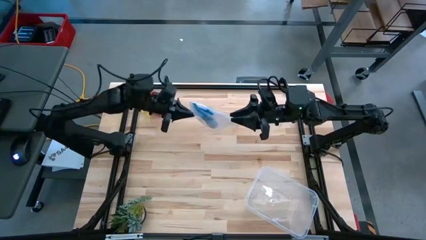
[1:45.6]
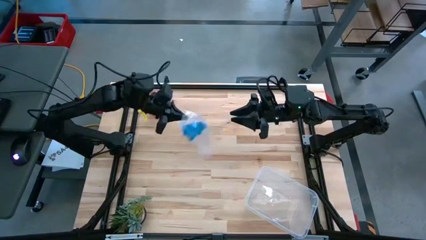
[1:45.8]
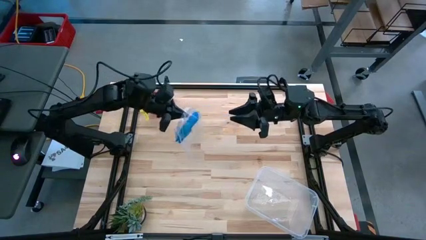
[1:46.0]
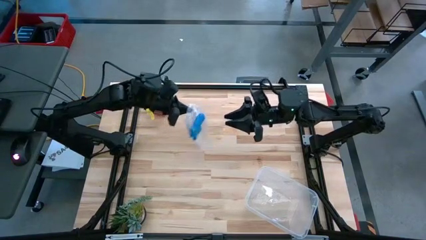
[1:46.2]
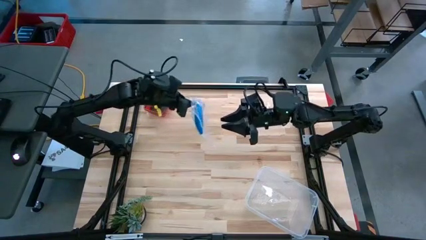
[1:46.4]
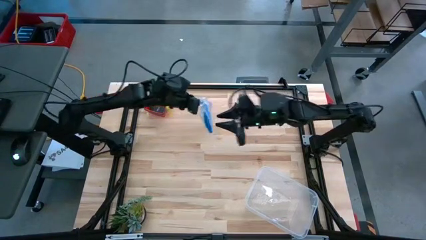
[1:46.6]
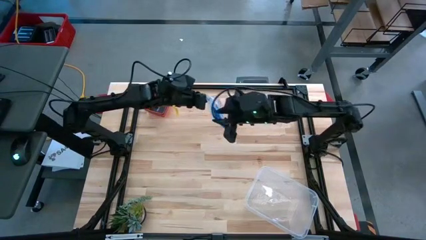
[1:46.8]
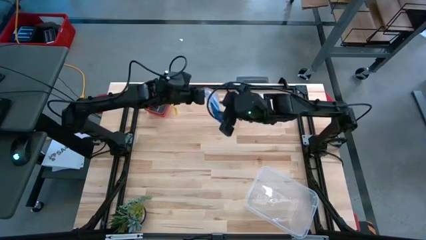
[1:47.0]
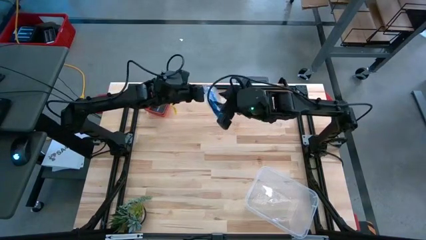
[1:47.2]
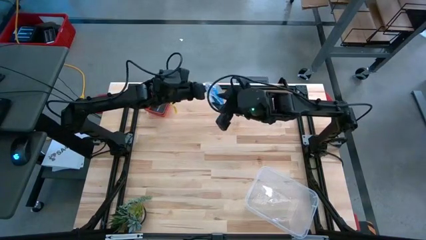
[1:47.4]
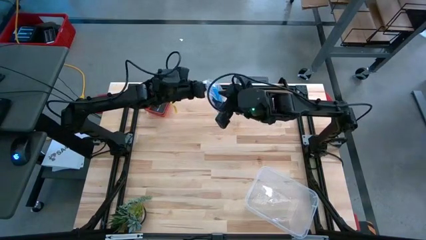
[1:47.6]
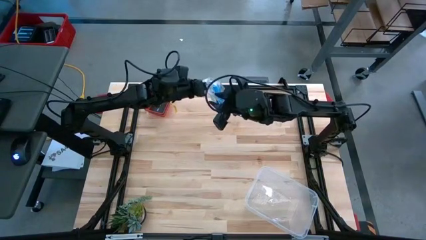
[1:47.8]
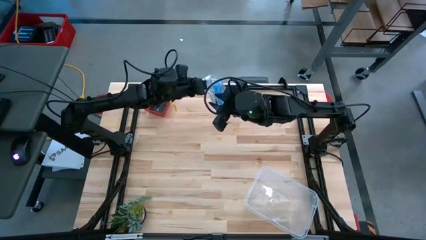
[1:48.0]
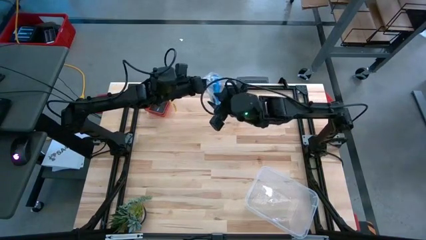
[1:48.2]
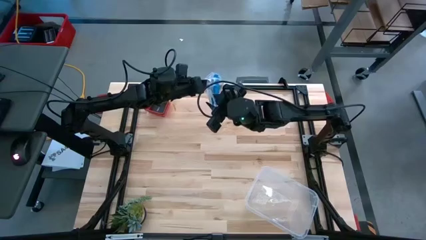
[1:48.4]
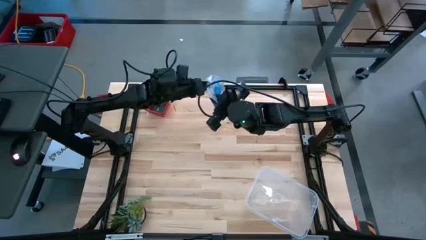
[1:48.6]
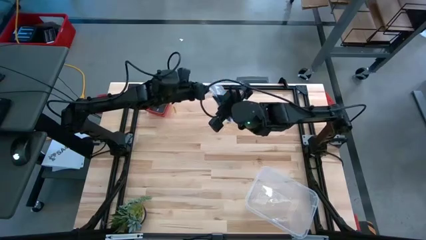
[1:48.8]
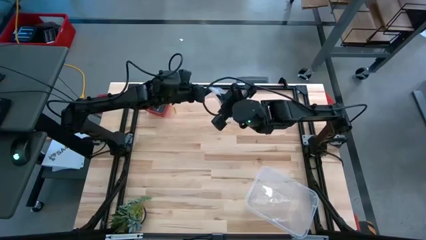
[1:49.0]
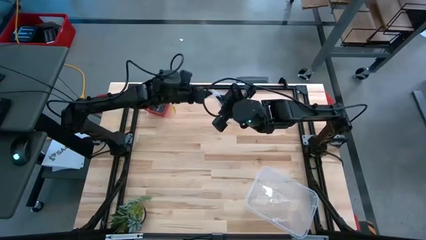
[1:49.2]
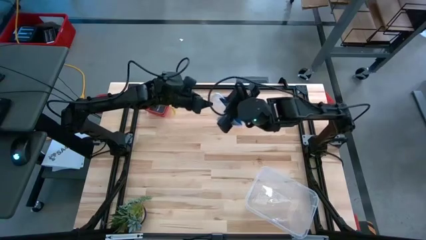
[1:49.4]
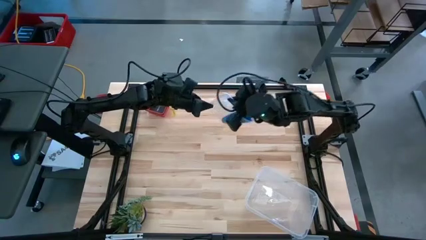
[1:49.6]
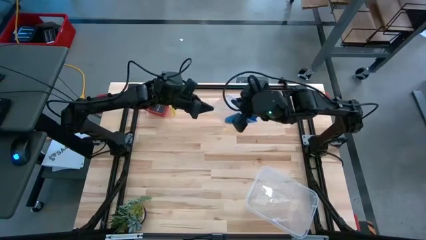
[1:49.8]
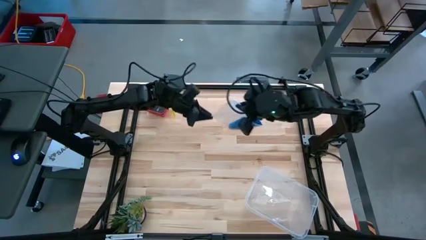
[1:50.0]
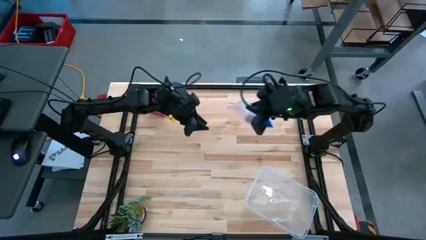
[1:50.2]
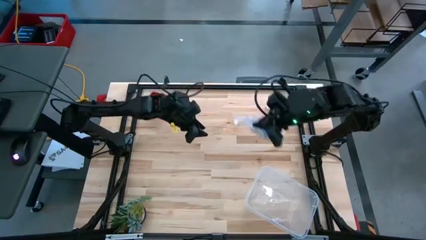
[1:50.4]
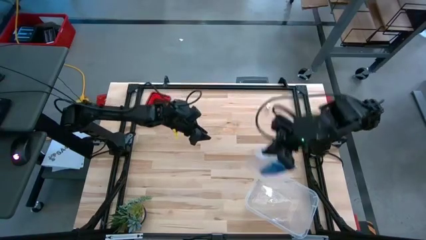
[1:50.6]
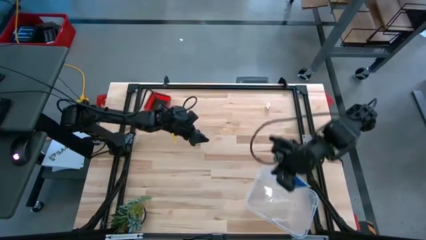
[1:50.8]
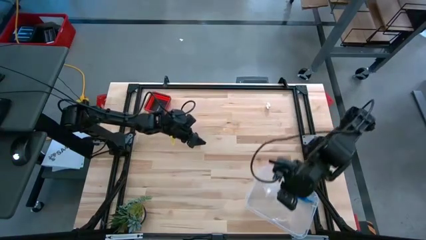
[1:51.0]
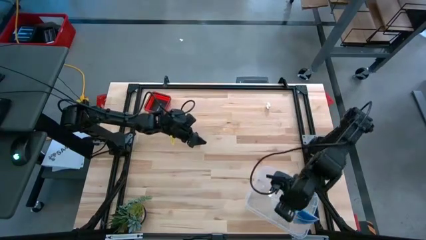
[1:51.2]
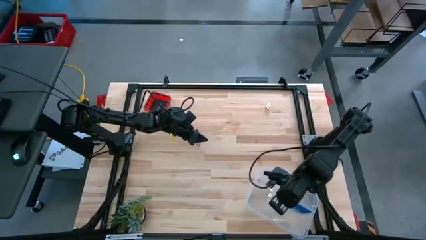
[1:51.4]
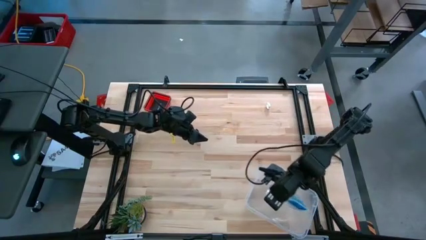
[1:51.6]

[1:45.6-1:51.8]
Task: Roll bandage
Put the transparent zip bag into the transparent bin

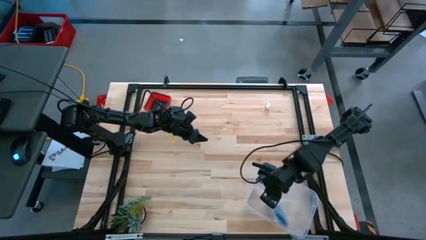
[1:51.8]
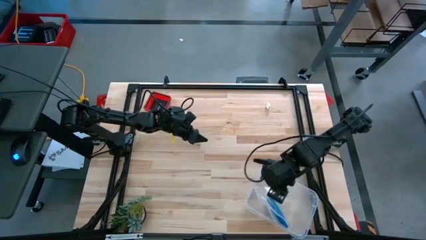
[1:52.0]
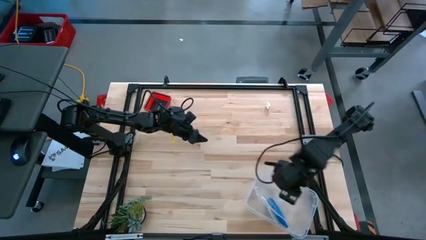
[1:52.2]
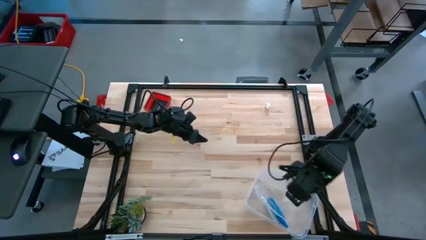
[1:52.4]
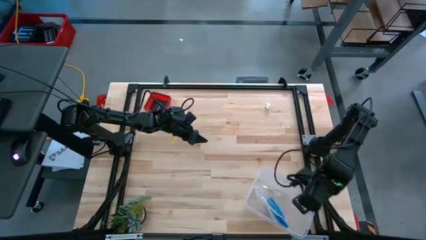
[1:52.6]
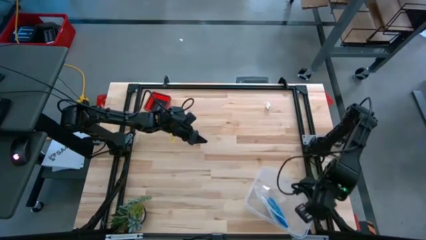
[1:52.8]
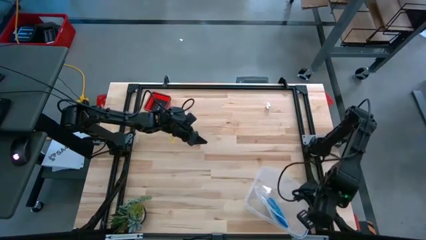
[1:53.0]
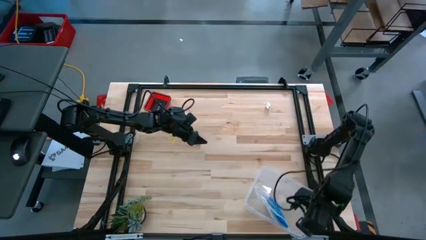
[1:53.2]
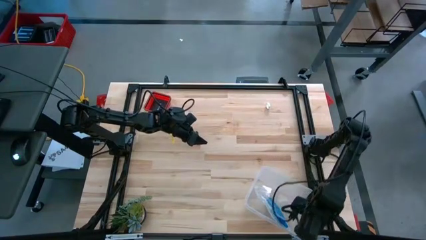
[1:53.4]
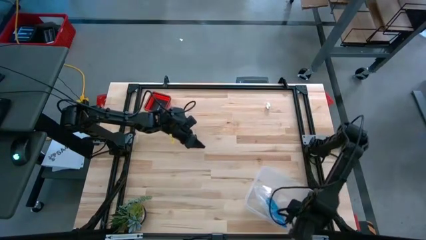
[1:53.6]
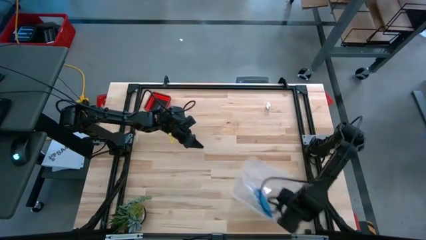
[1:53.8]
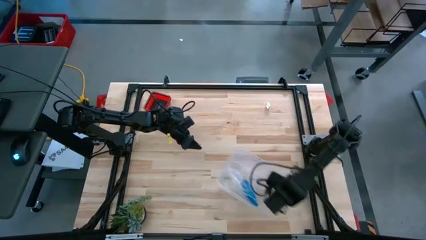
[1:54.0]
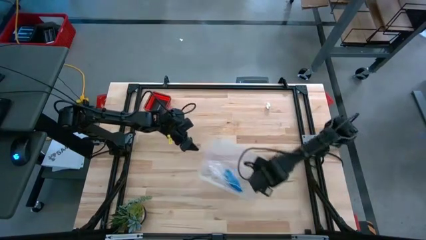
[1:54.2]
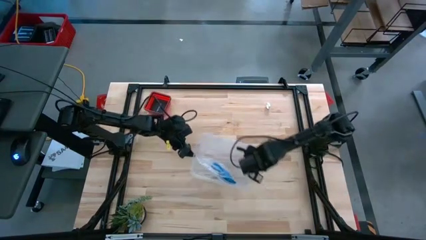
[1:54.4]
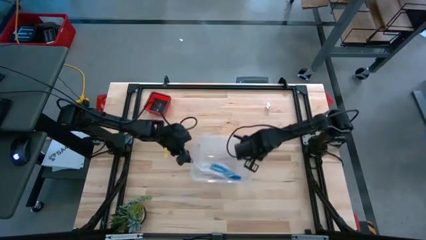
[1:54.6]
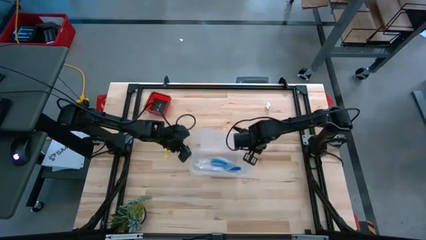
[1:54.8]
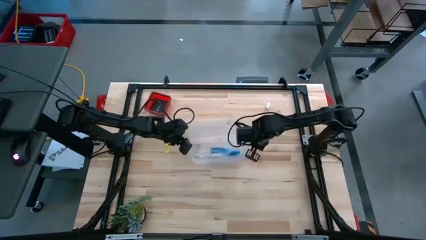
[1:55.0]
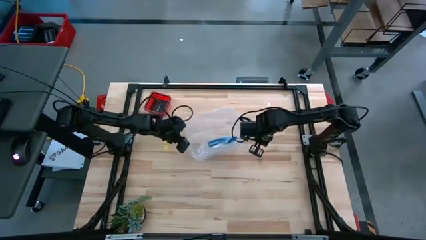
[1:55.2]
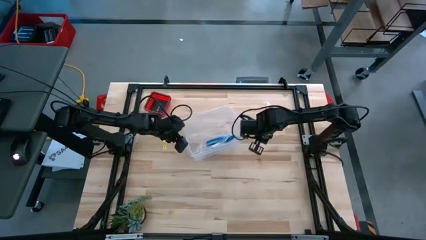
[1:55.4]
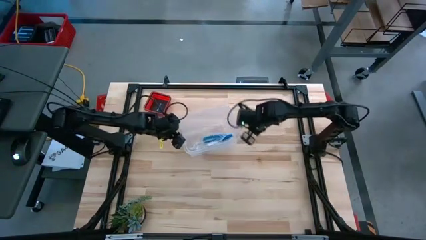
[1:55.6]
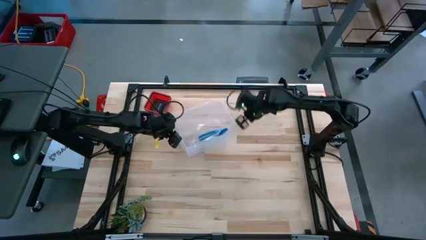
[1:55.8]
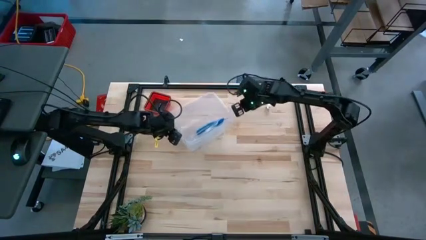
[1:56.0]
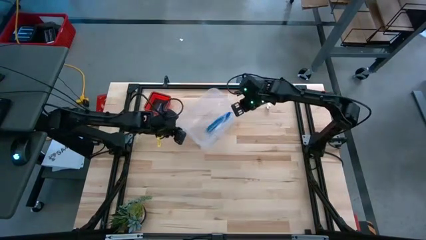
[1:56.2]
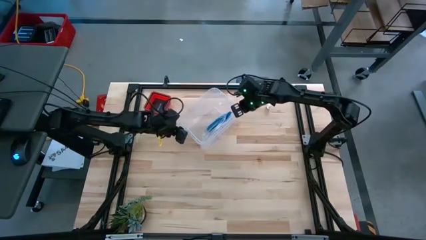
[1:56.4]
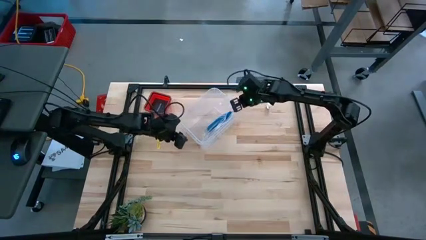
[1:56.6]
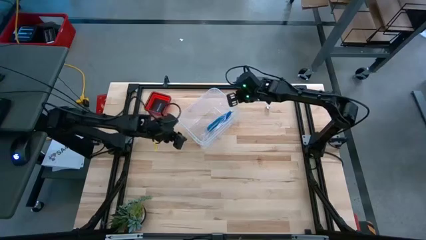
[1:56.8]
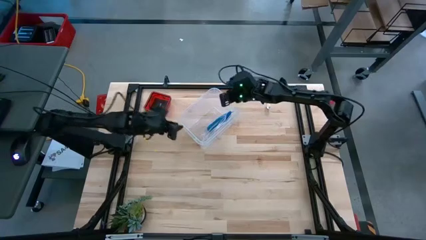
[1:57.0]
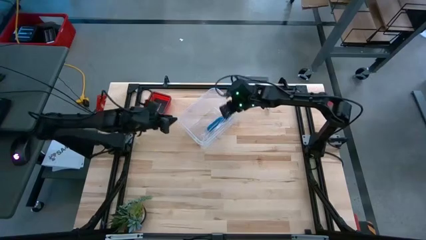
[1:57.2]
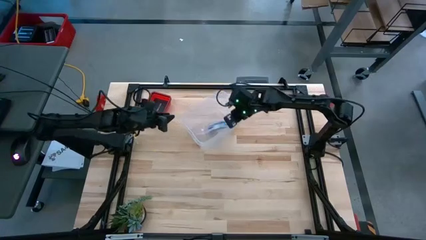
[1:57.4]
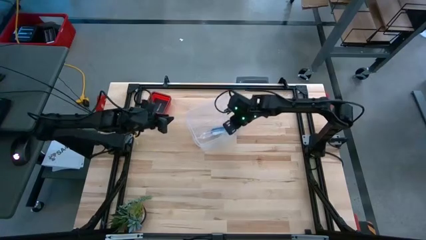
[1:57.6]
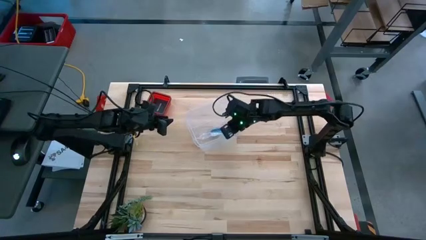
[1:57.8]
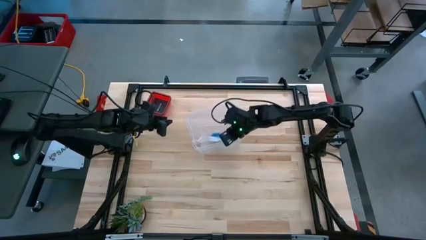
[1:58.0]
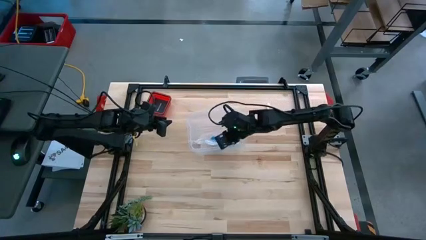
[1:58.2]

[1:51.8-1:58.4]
Move the transparent bin to the center of the table

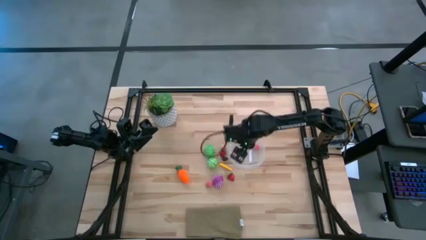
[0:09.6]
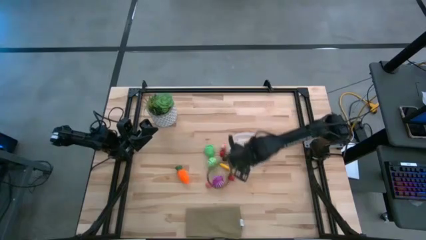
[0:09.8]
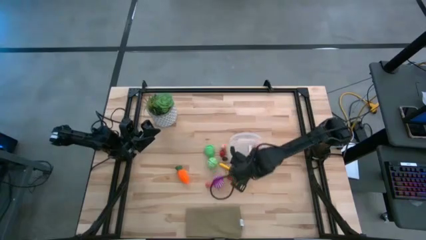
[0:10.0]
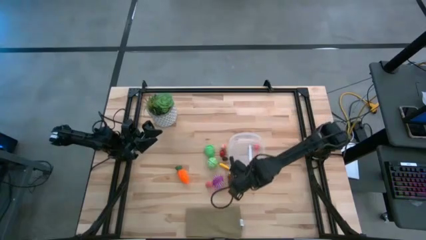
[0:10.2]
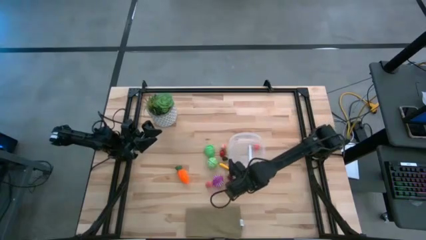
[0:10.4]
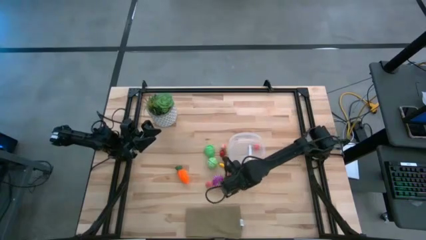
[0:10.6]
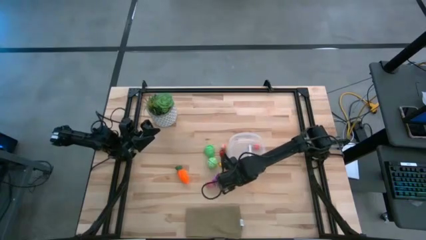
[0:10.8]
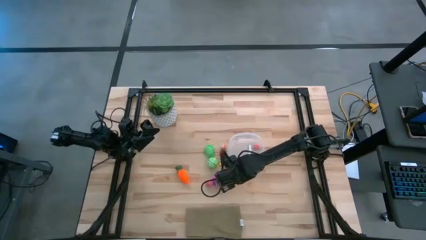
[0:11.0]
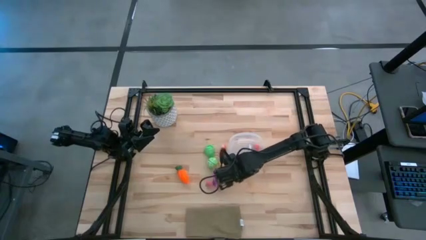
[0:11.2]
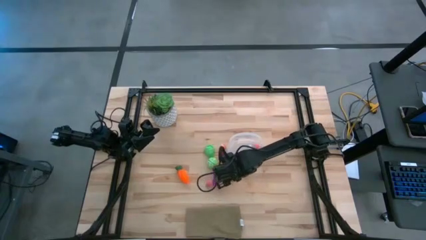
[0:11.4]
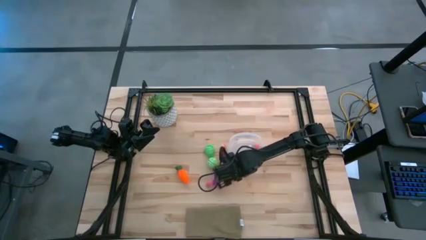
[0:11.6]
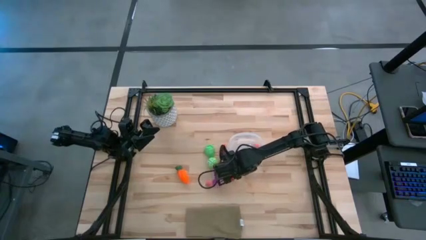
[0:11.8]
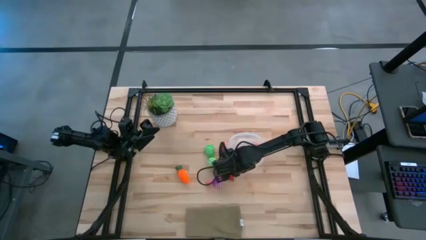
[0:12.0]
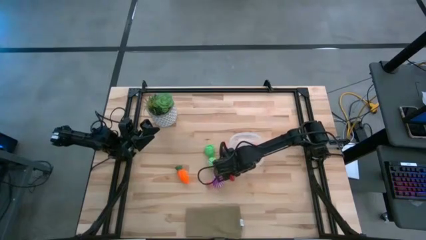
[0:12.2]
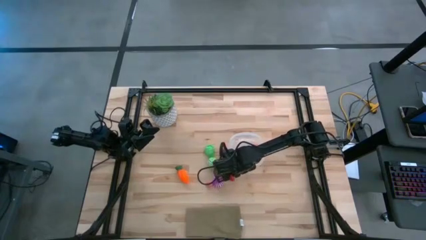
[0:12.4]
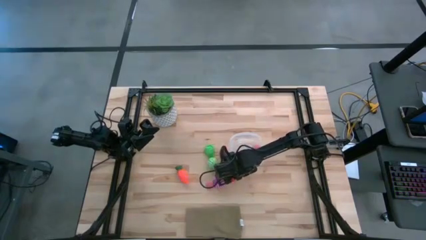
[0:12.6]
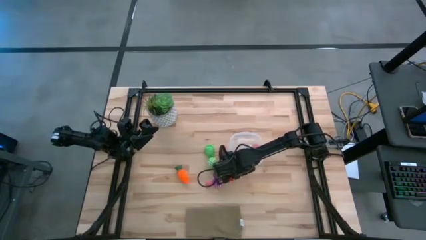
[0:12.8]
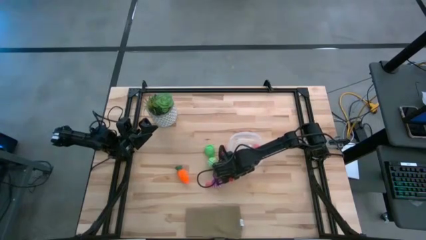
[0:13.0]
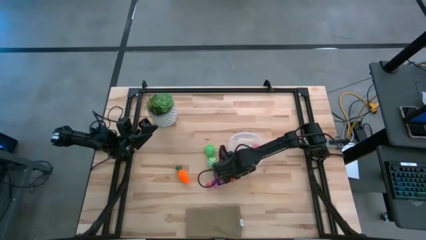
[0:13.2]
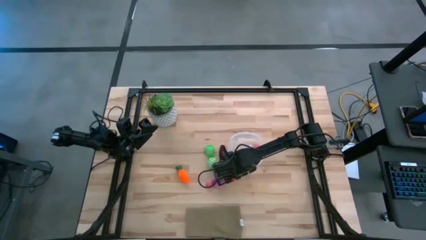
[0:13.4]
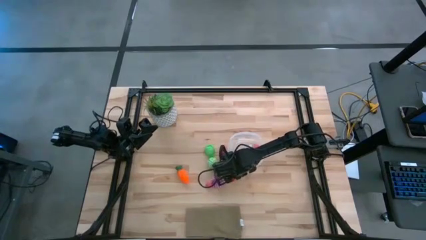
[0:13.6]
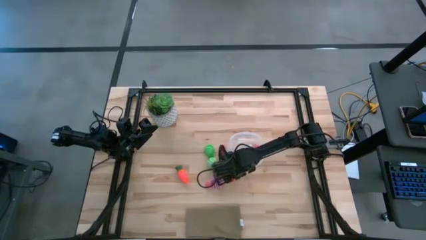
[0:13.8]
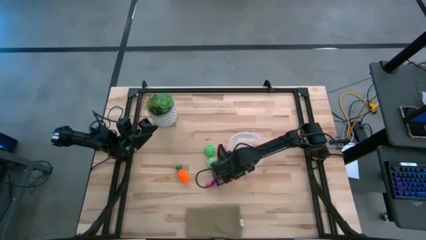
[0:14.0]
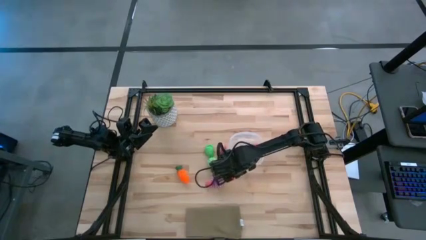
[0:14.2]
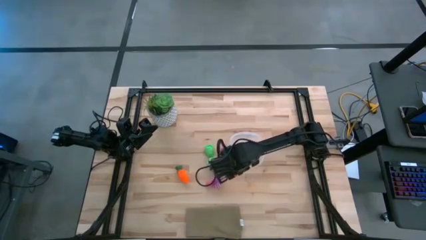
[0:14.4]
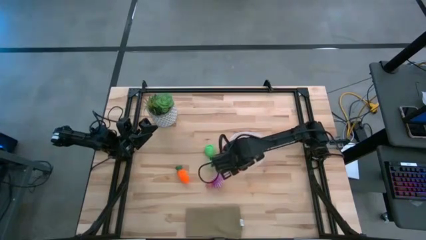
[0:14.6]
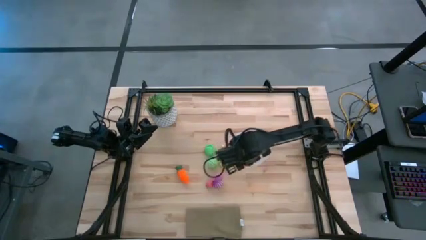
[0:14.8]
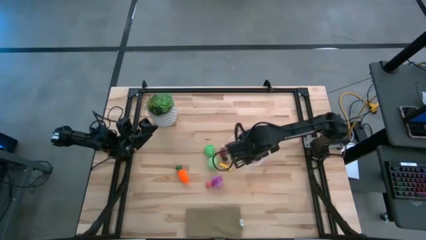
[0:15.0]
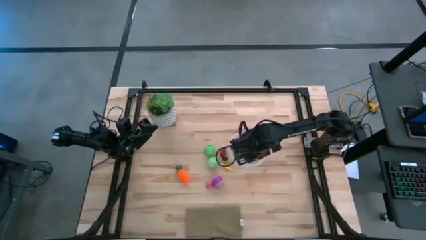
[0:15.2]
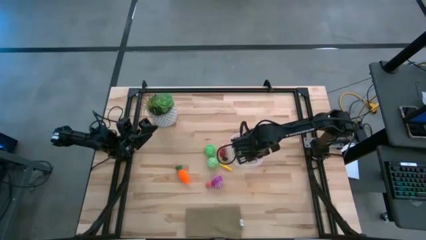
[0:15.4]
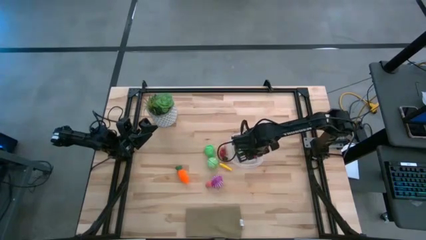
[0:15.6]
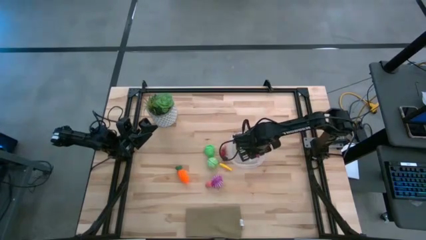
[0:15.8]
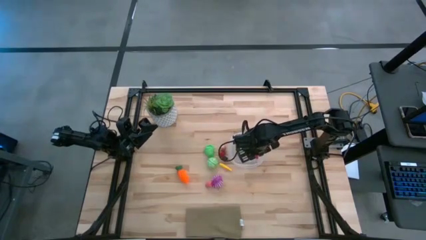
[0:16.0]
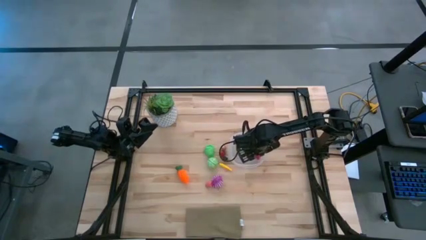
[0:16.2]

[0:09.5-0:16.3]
Task: Pick and placing Produce into tupperware
Put the bottom red strawberry into the transparent container
